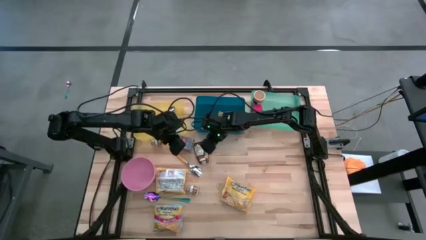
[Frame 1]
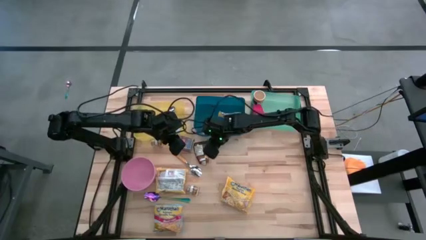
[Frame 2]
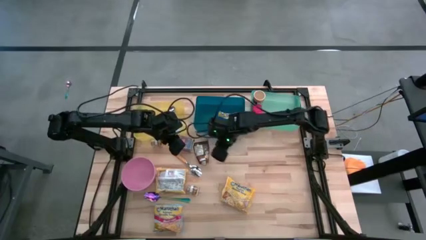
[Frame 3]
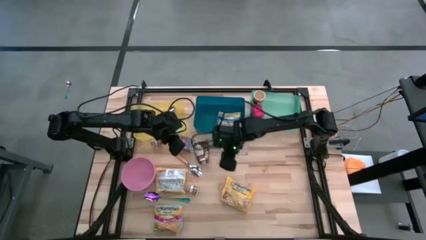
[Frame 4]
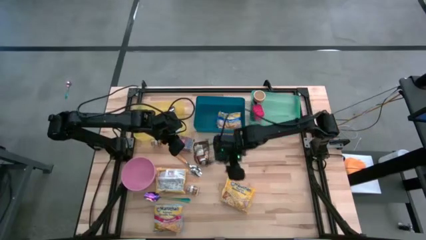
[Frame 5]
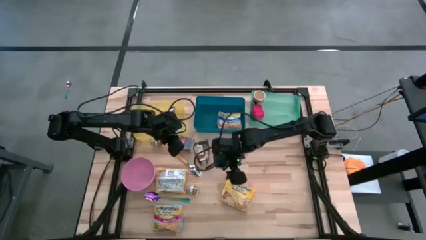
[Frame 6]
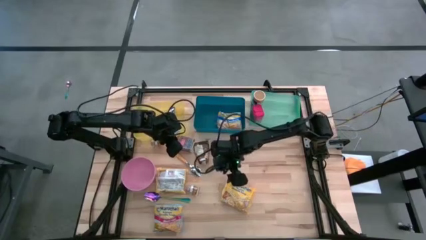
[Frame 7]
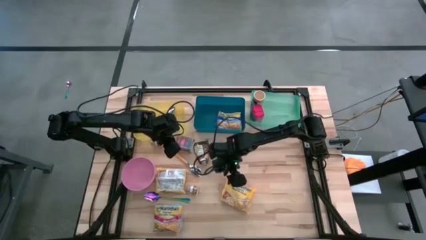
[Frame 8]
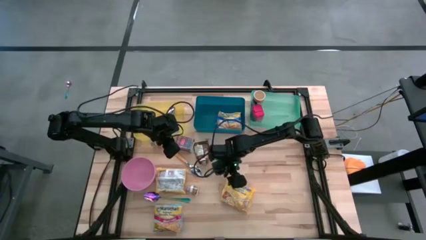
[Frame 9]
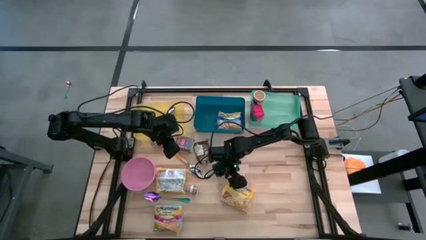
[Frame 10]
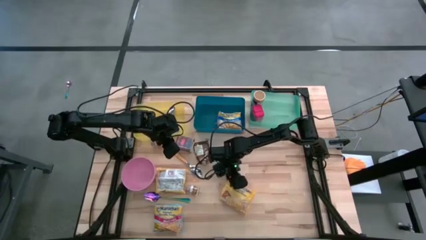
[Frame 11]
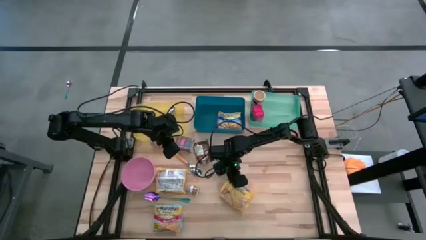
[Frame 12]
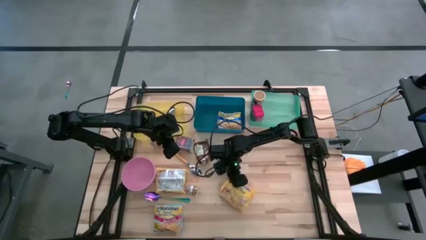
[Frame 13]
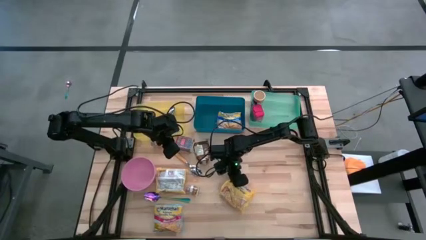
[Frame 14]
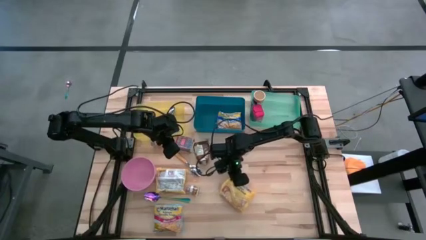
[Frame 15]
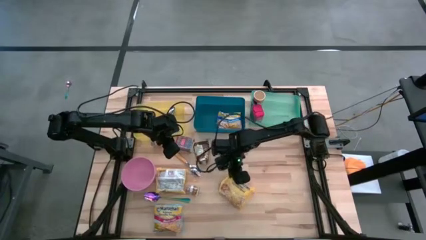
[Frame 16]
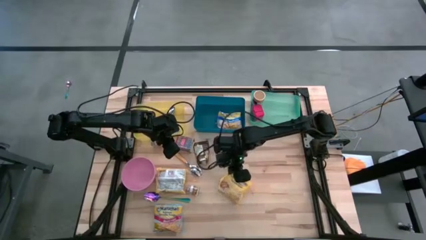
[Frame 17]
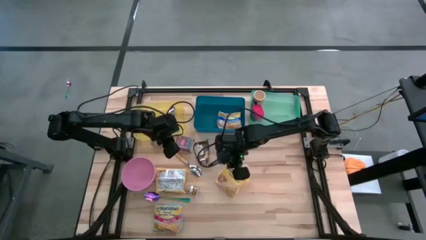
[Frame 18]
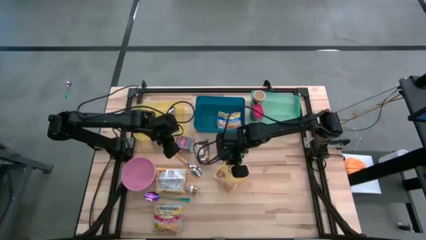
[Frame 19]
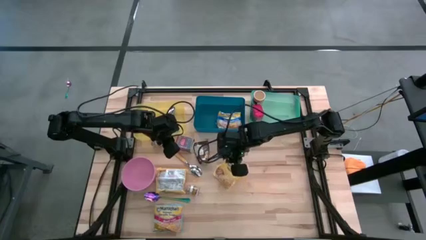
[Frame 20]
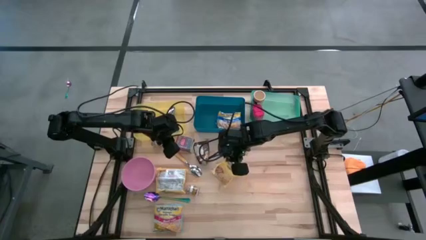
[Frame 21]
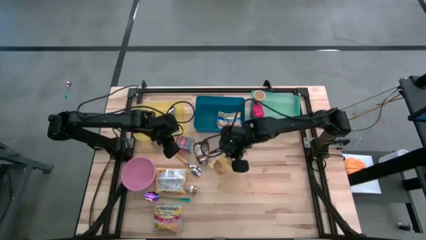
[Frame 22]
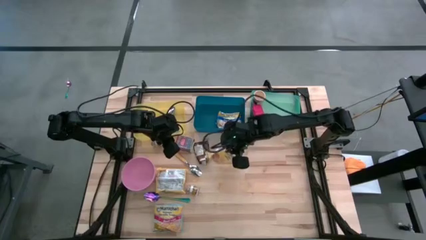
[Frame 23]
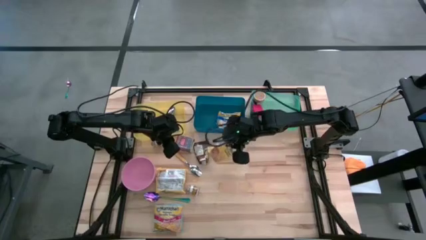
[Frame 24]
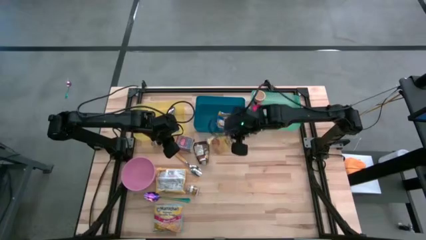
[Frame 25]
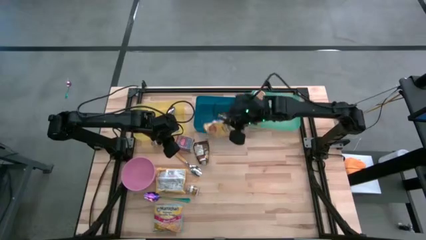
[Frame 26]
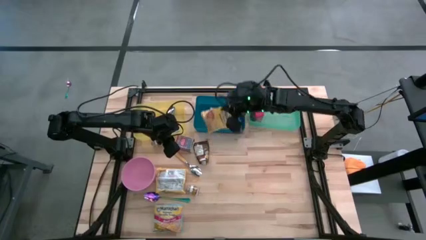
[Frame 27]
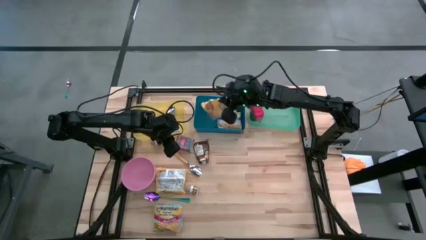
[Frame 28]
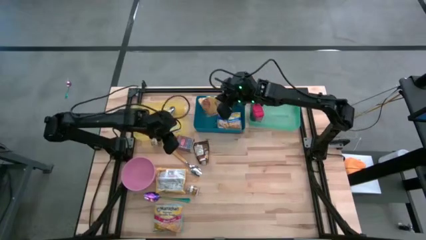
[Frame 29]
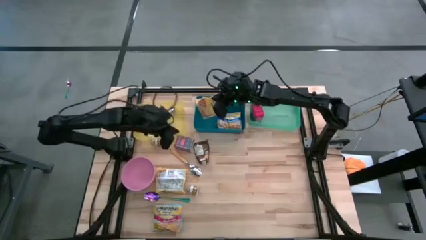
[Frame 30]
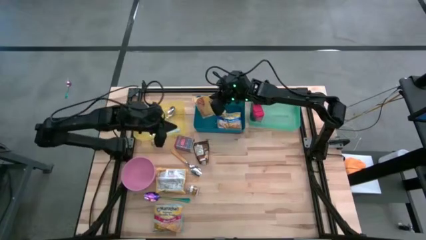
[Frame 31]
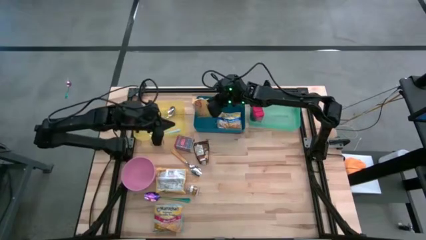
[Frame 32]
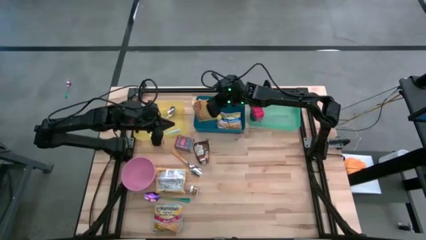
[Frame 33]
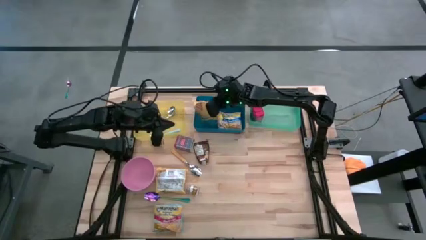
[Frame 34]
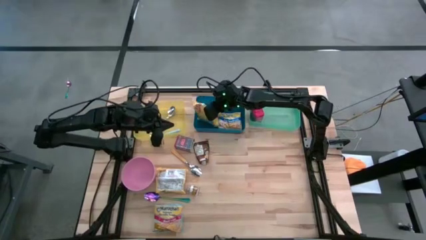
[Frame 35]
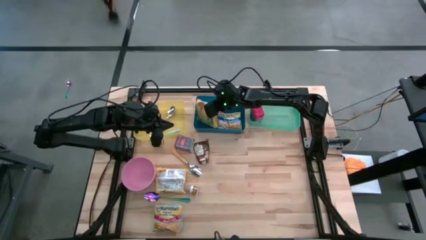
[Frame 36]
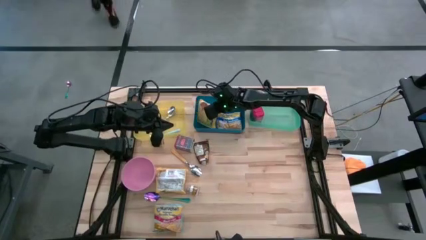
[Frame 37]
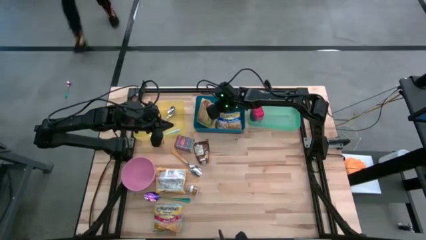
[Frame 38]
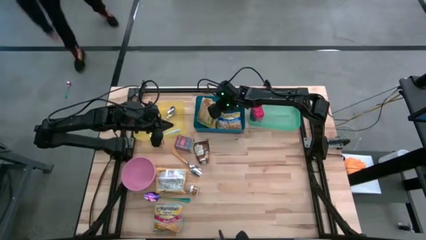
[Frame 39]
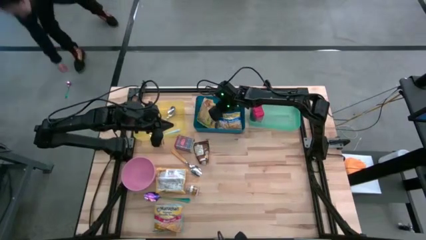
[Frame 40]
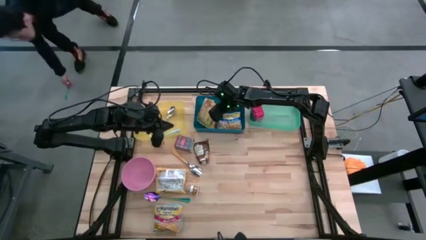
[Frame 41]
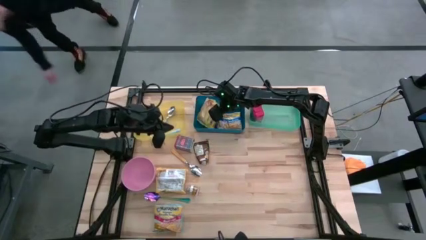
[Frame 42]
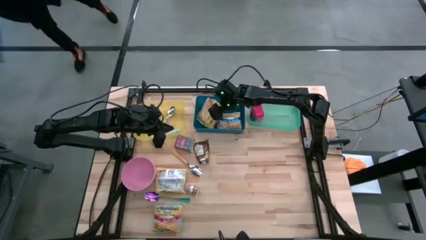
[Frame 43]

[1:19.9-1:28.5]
Put the right yellow noodle pack into the blue bin

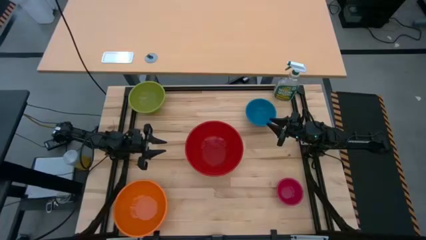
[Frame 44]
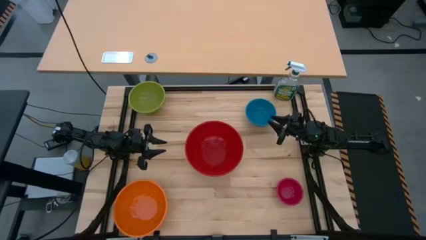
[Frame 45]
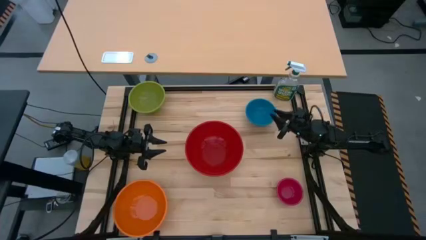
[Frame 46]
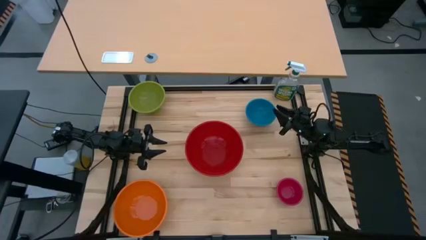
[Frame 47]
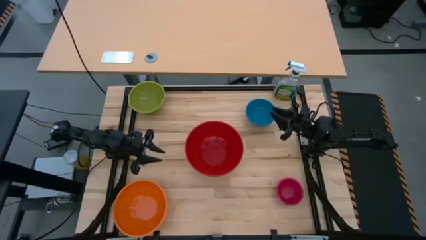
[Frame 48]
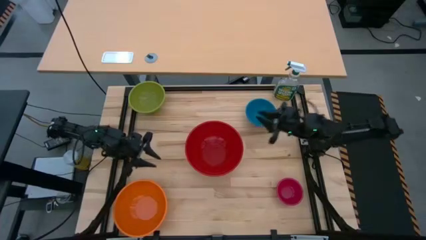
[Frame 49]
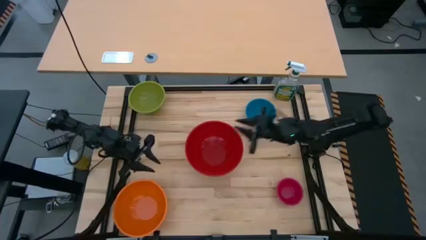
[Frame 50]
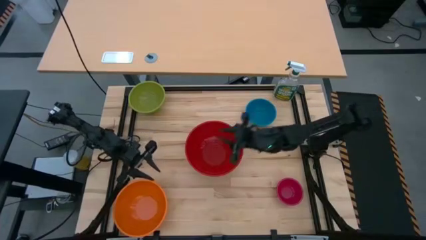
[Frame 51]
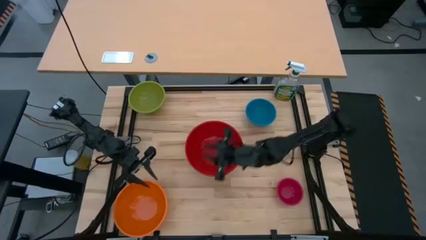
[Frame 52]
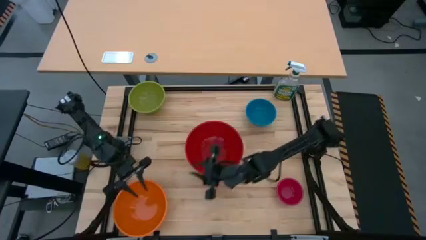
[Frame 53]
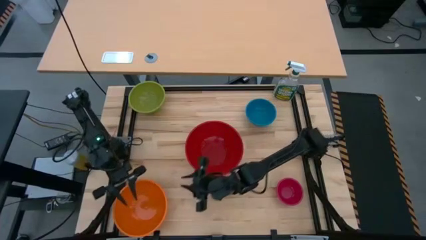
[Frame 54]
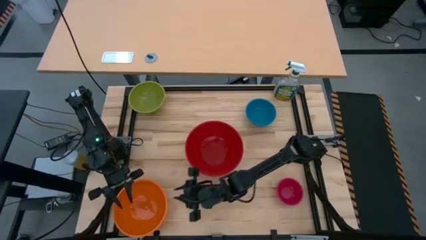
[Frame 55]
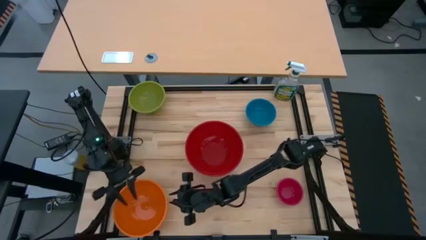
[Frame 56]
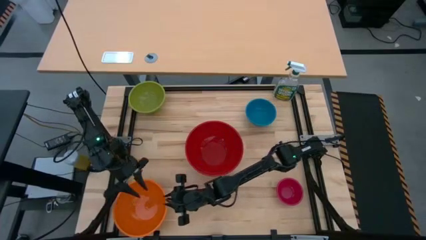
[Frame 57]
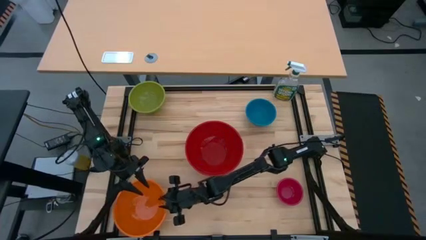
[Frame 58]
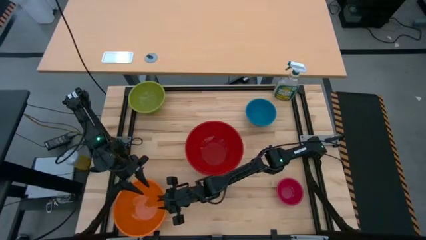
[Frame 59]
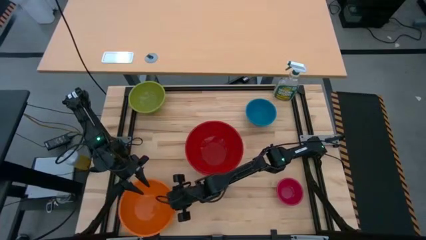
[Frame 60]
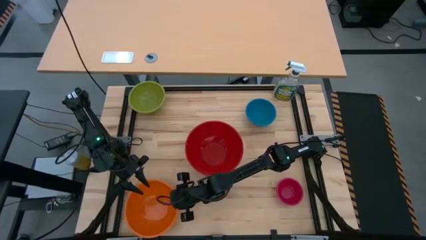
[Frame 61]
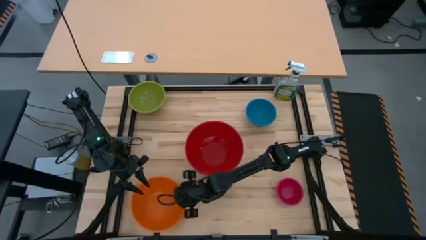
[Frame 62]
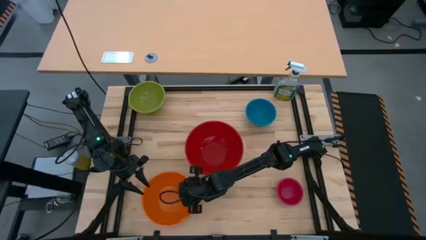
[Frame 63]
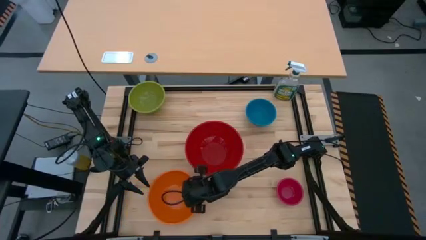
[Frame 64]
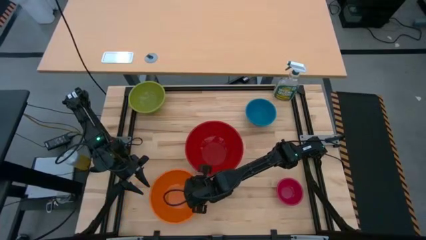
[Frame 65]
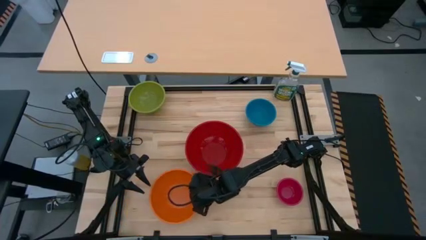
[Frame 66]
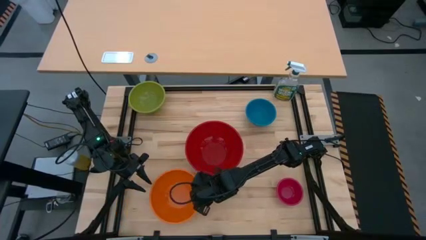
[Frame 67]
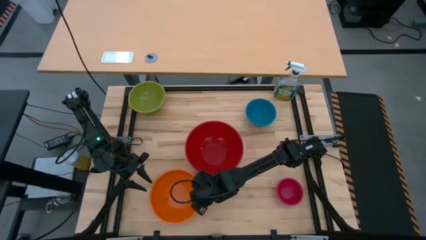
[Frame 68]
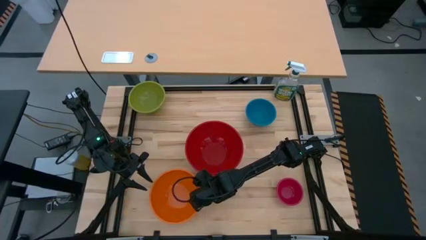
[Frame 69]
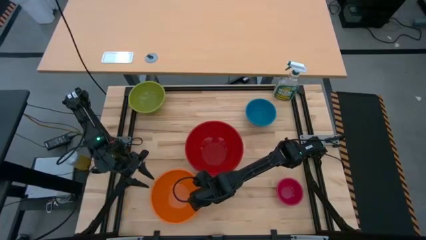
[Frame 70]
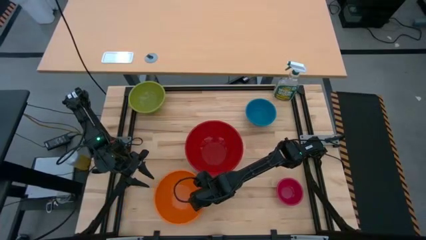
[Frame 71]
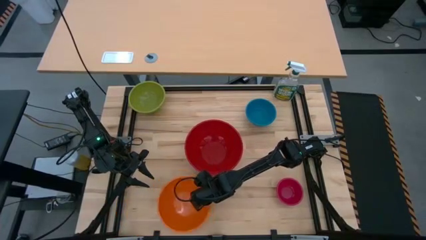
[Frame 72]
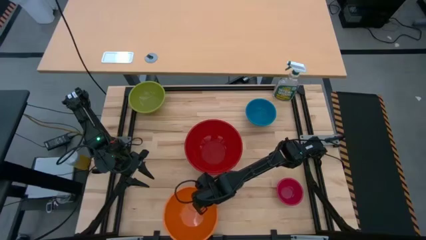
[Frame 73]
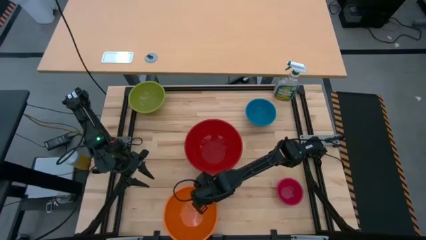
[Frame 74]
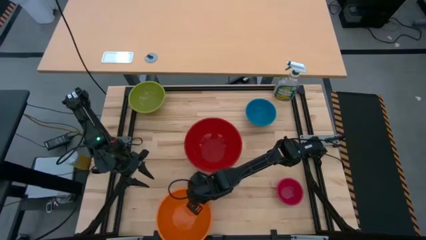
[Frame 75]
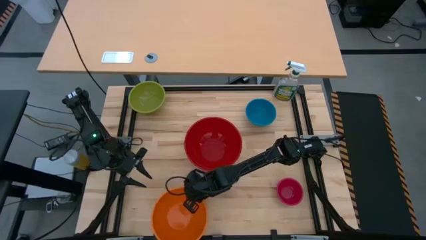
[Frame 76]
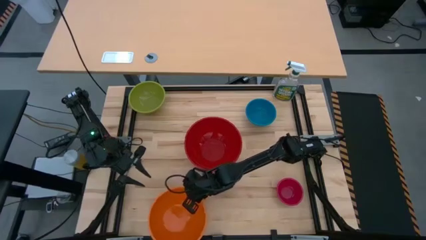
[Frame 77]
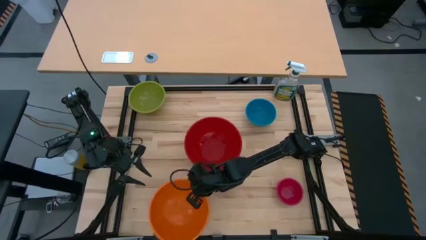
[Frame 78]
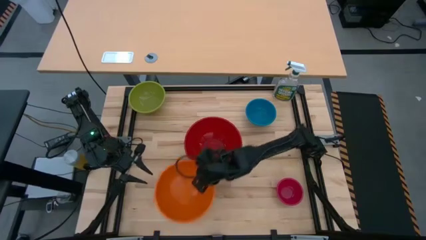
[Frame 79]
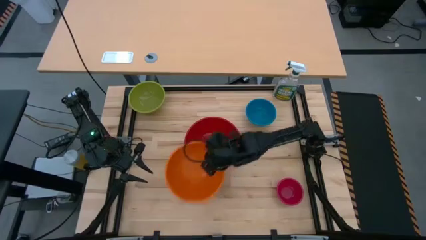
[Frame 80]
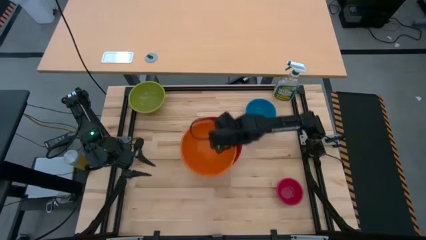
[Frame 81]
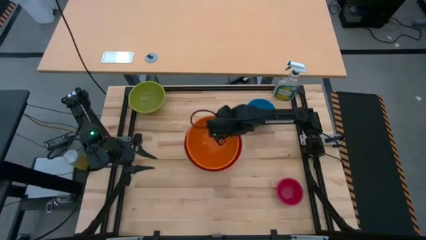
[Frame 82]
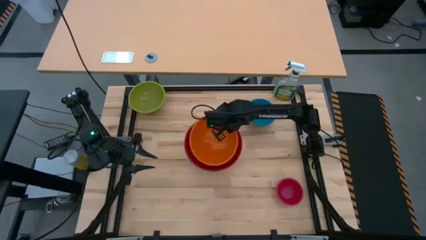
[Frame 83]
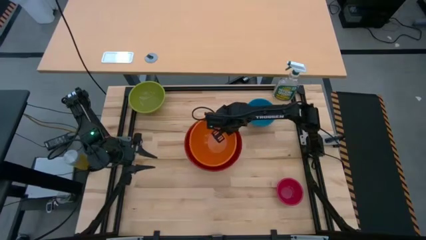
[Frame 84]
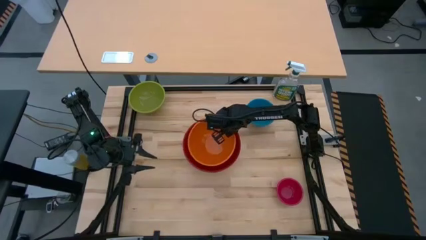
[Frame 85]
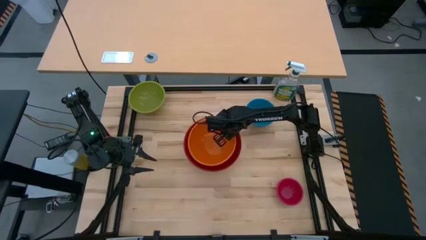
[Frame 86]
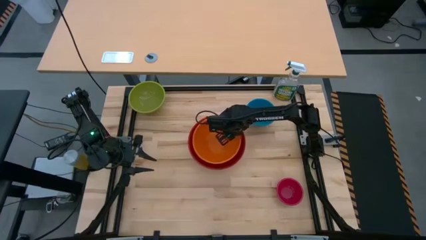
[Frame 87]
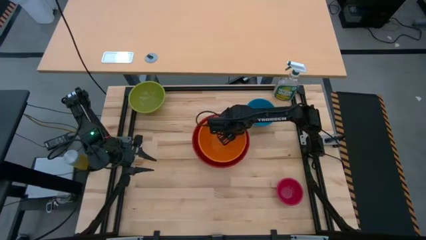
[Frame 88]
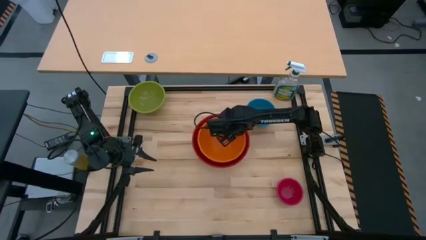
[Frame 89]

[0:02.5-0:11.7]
Stack the orange bowl on top of the big red bowl
